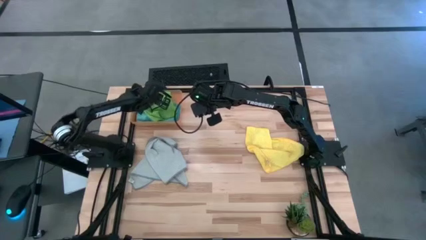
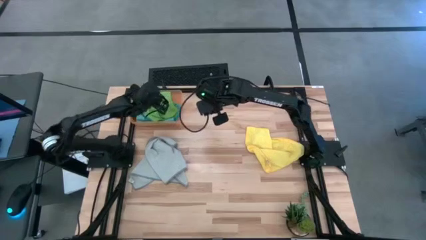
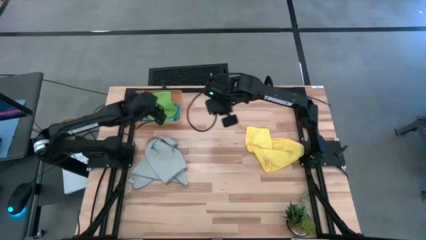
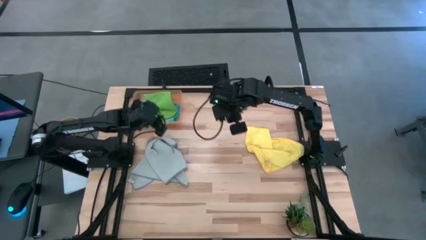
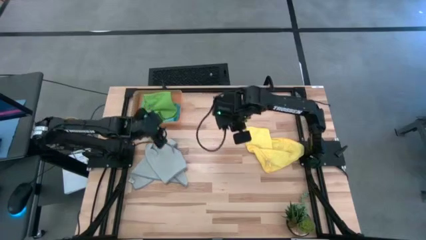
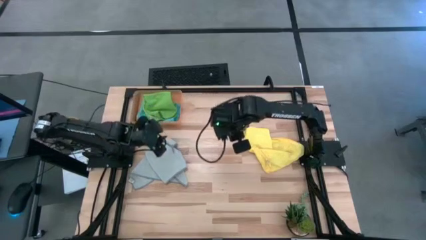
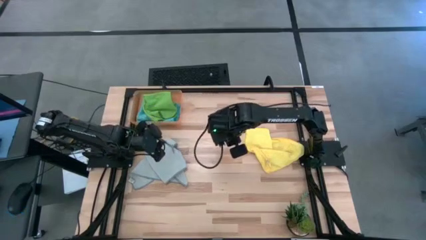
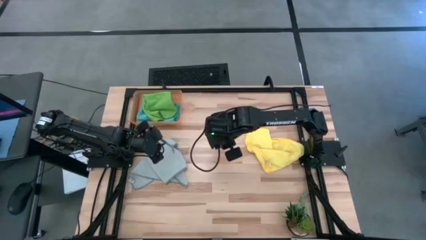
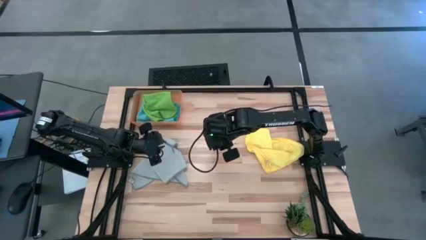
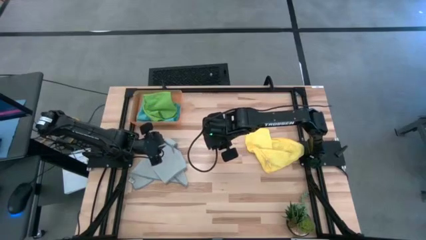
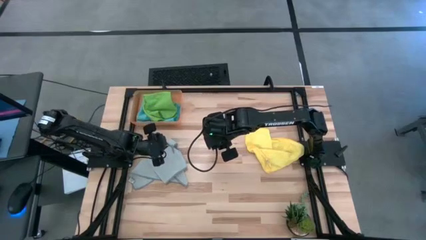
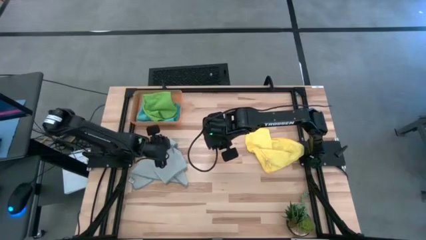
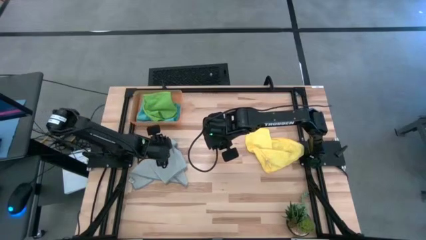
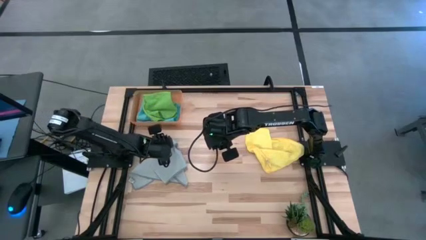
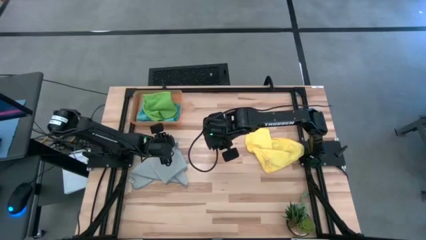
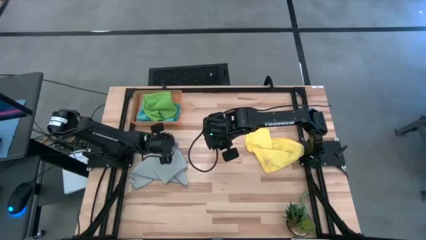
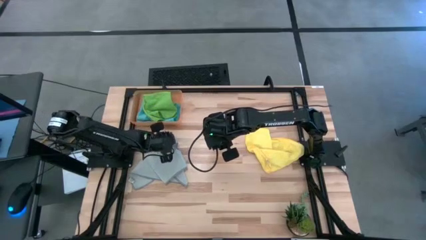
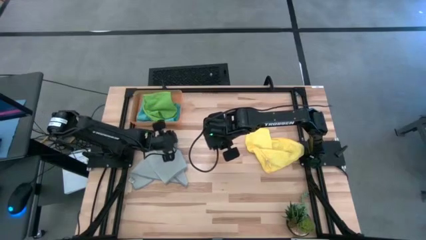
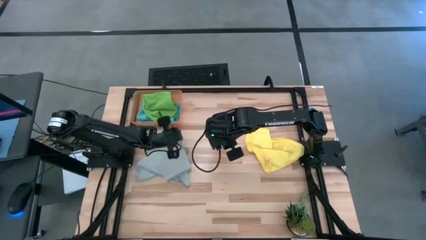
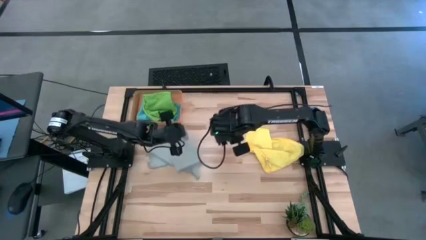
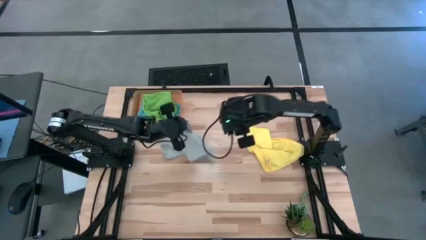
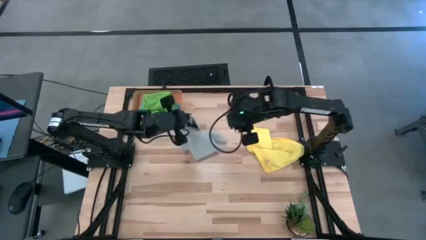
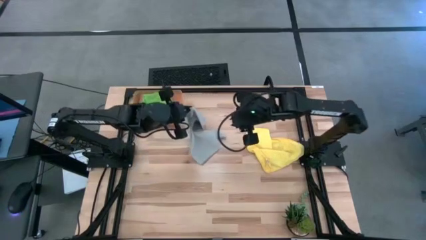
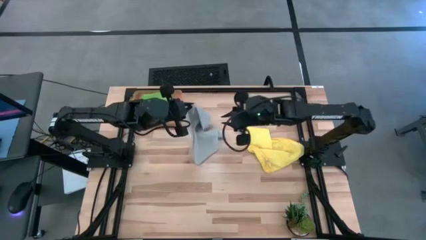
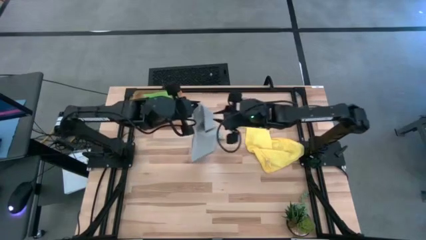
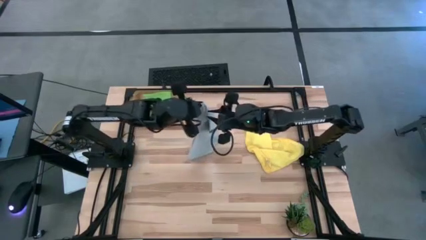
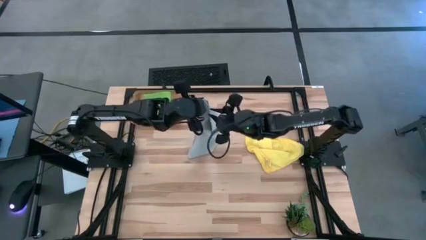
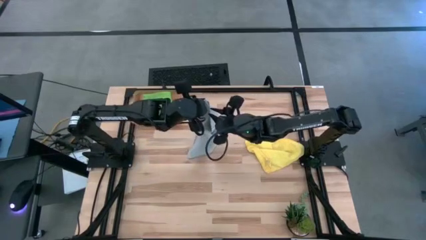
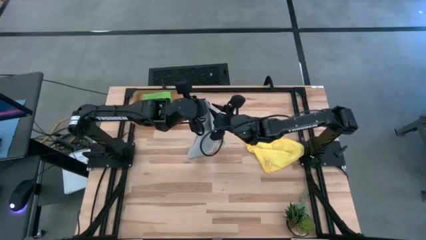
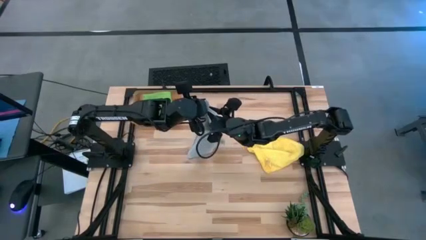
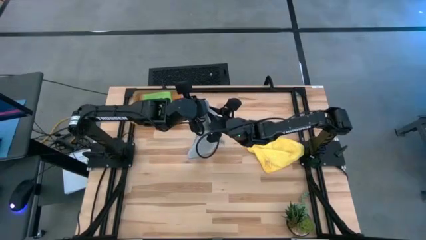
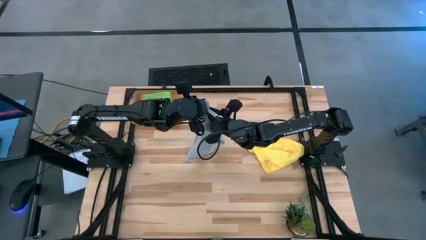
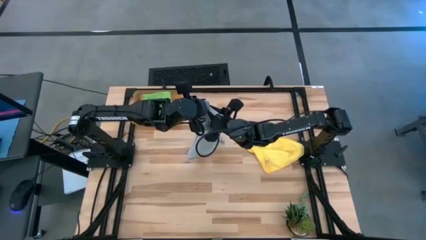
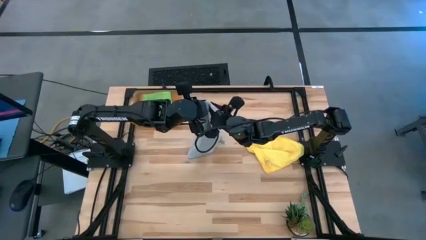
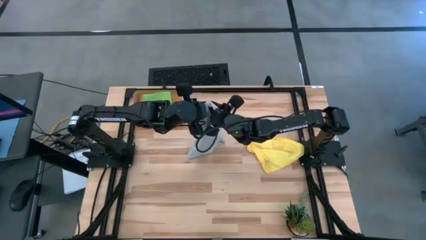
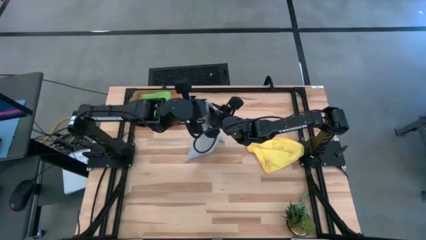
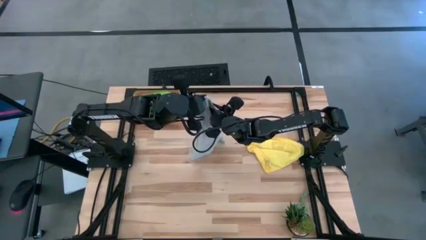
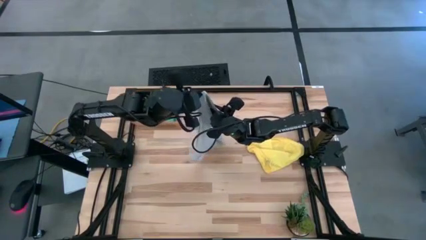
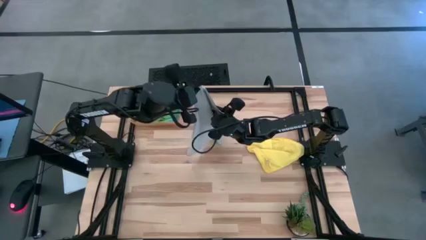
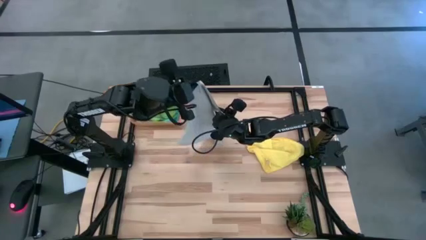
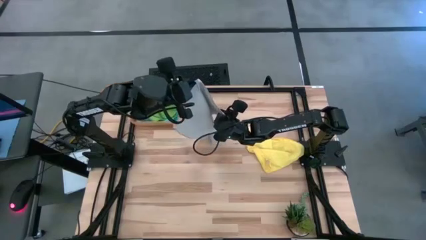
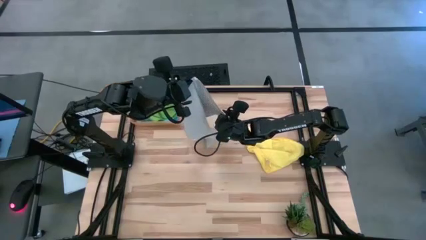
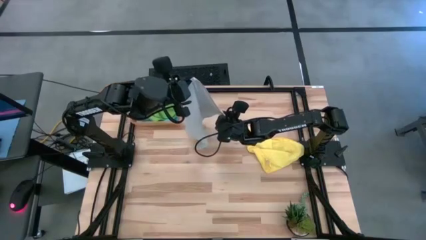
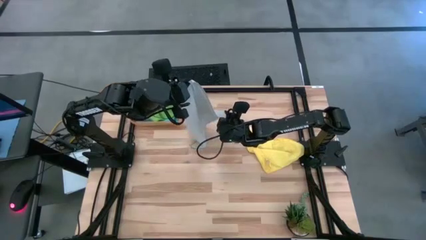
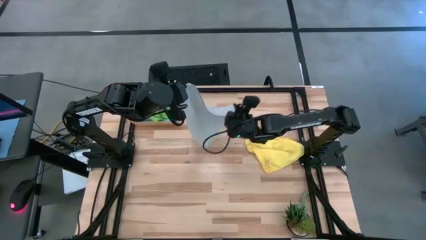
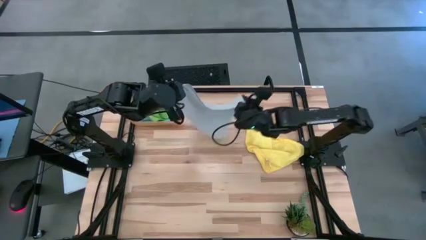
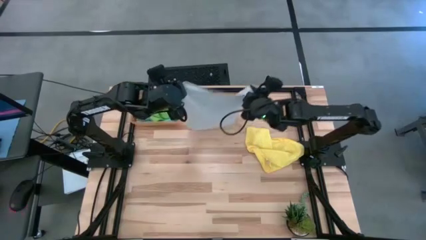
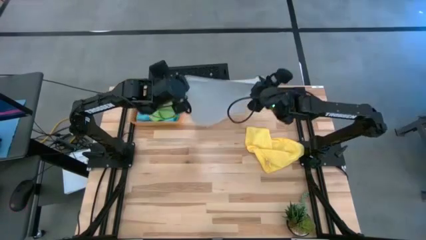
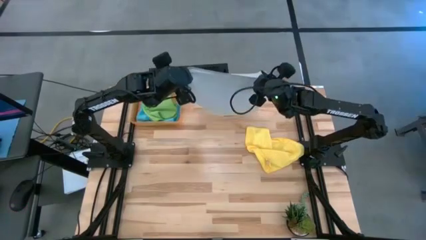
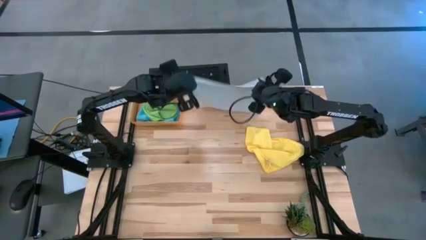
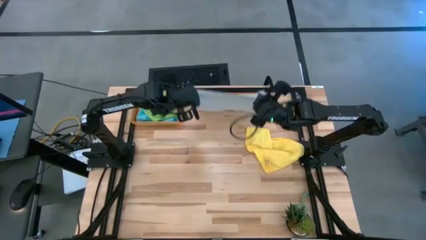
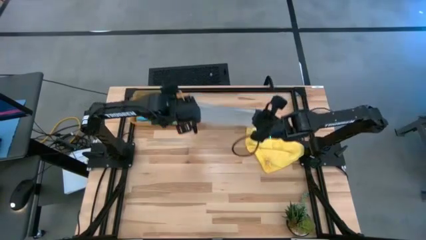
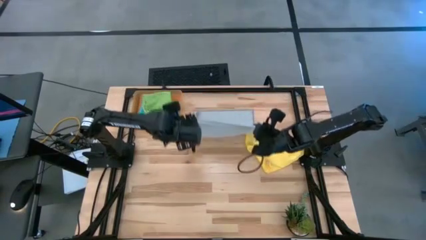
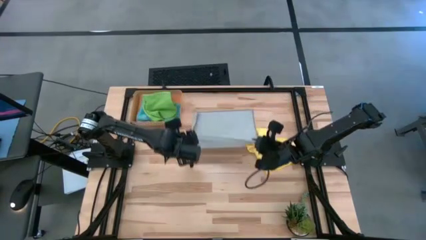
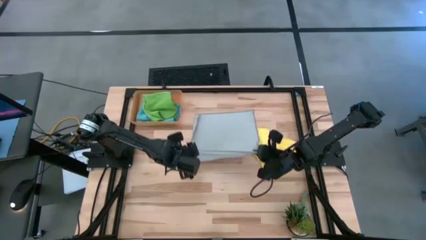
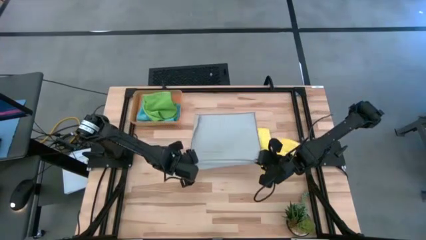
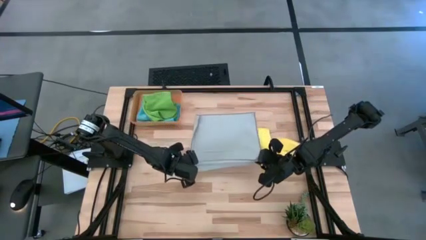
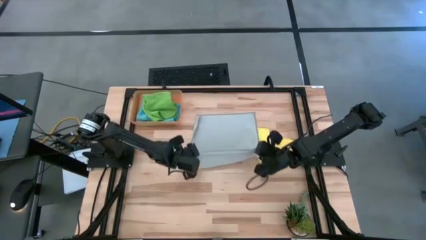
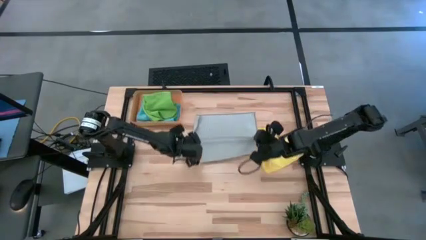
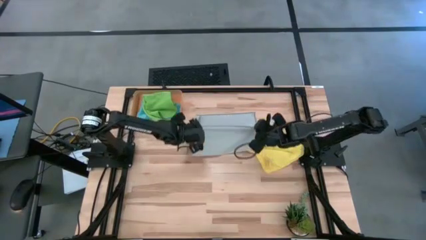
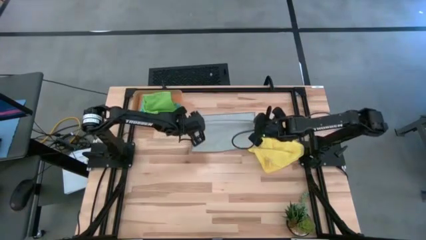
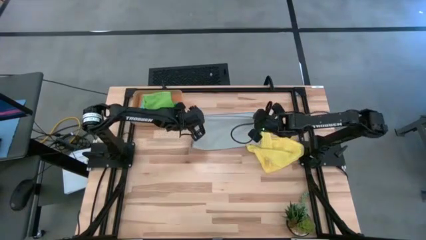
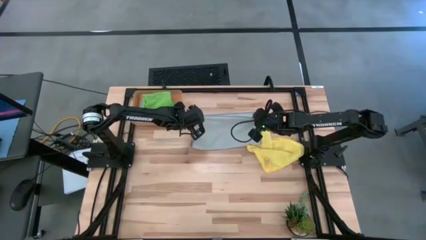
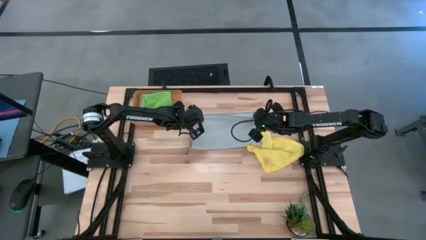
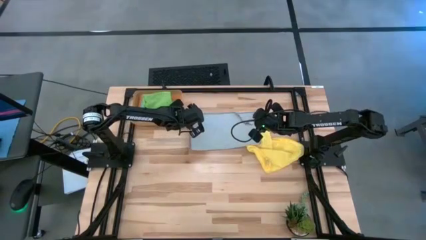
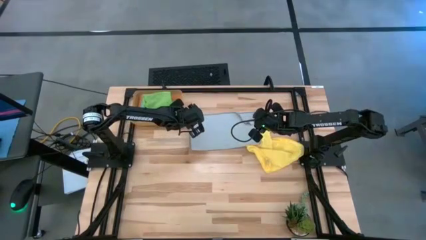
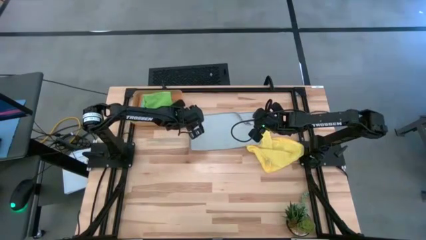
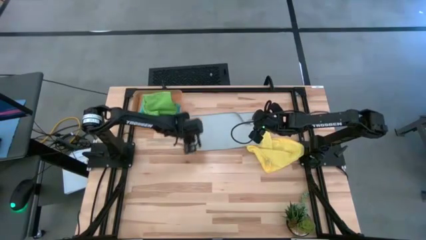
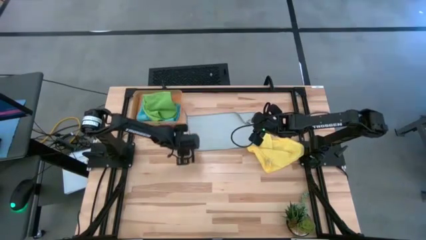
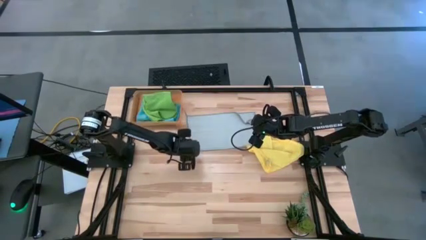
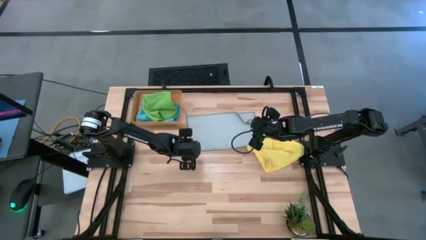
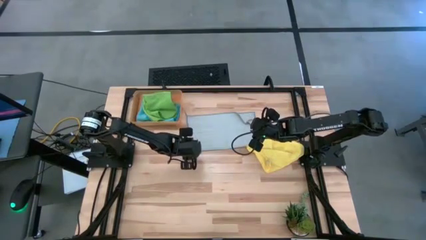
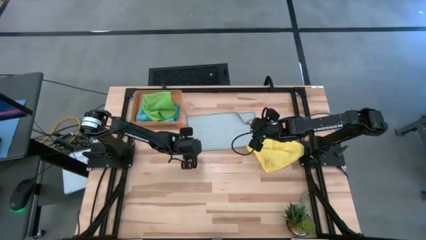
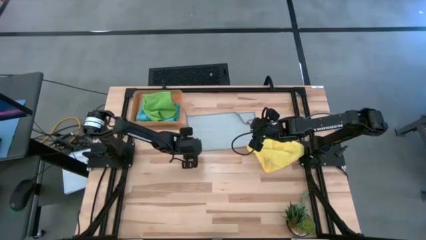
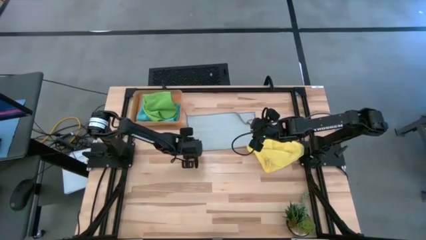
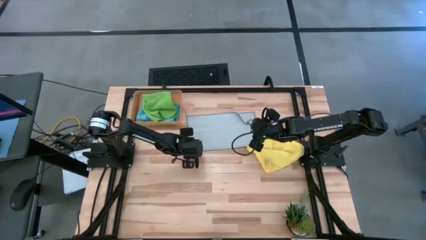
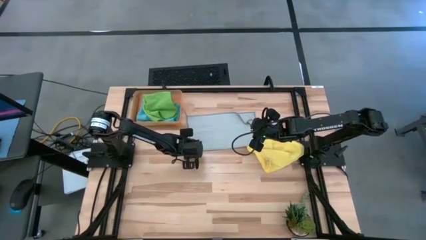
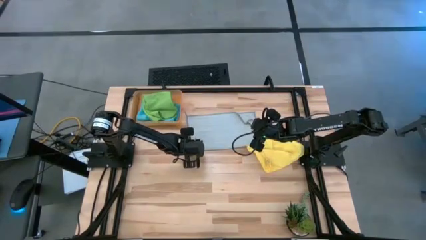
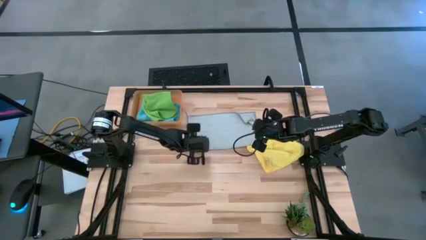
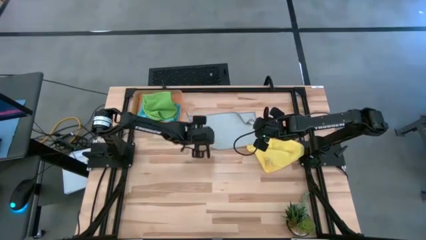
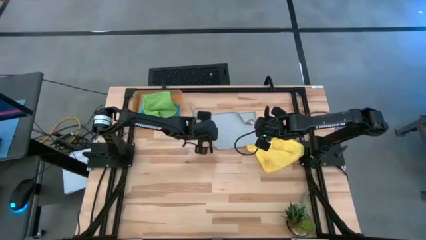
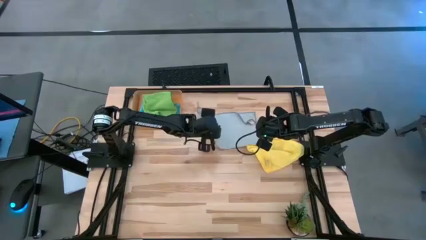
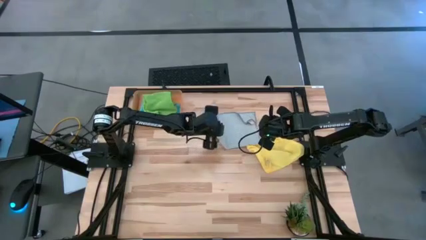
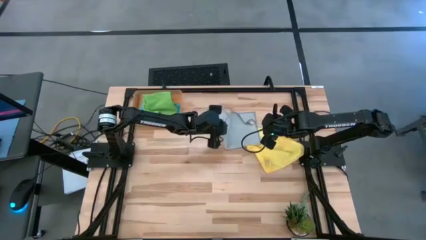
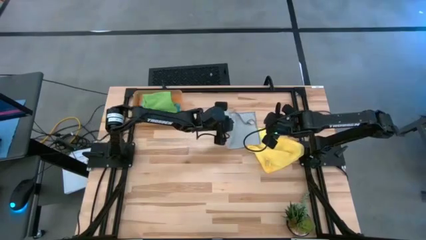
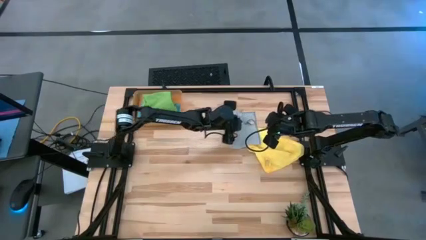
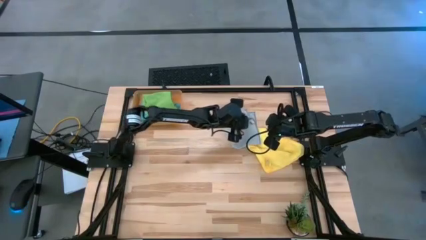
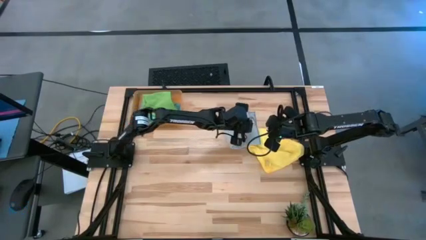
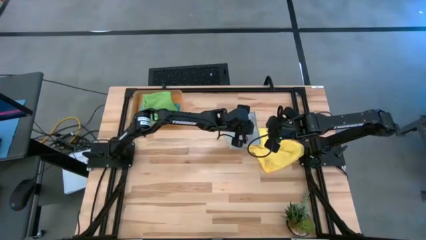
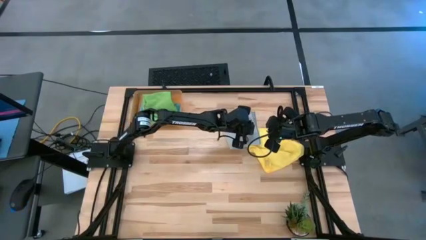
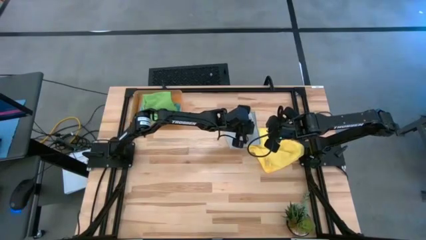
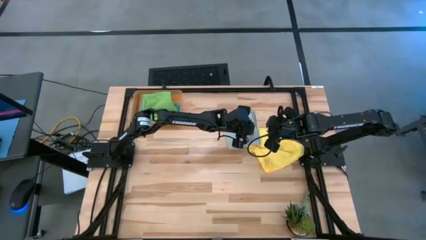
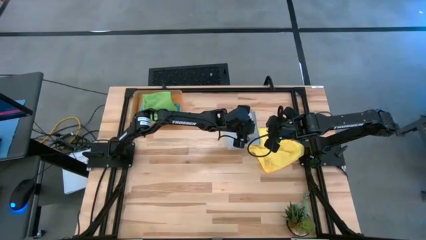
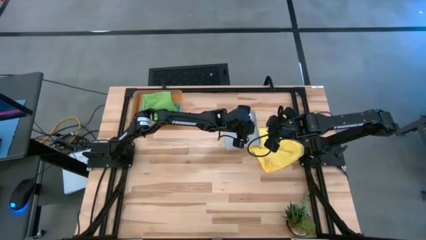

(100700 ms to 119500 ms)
Task: Fold microfiber towels
Fold the gray microfiber cloth
